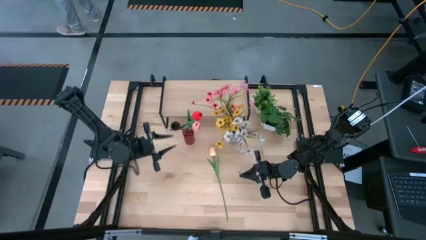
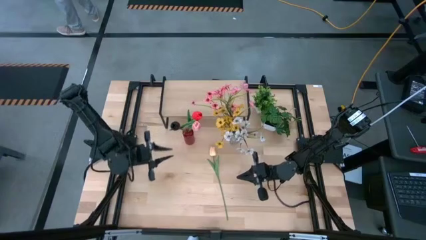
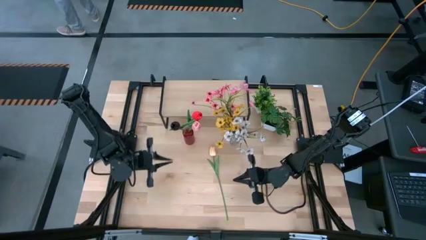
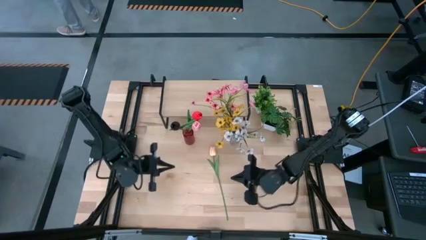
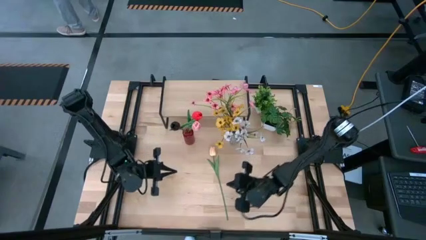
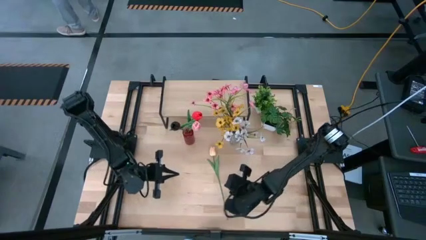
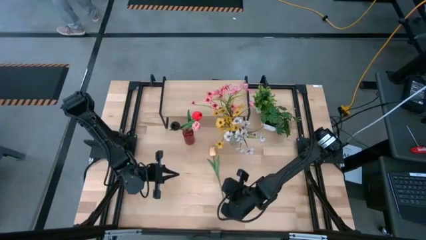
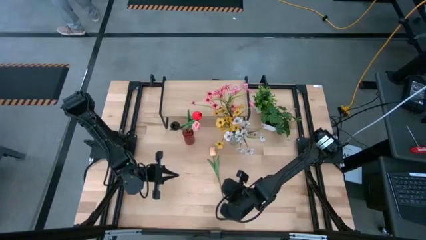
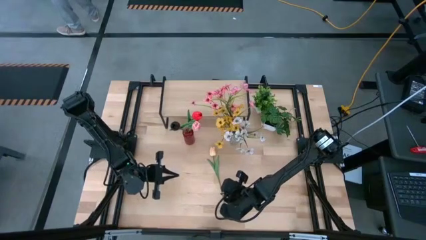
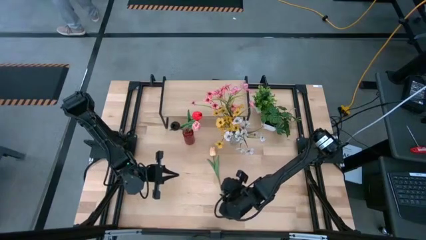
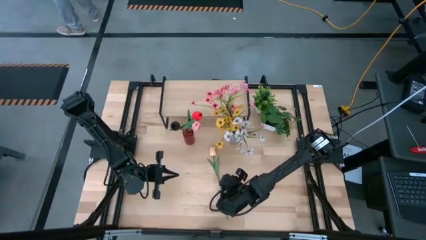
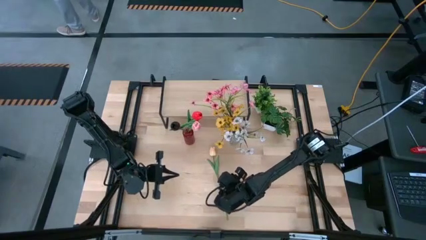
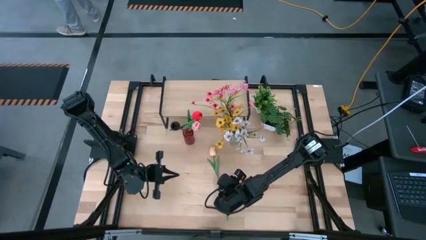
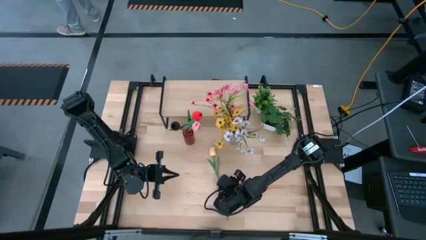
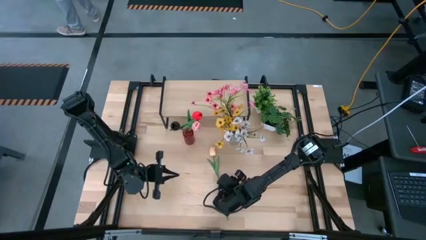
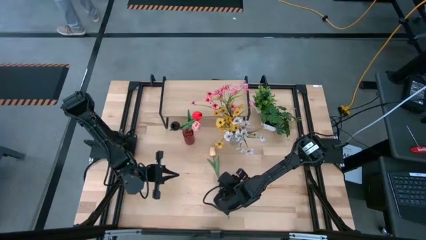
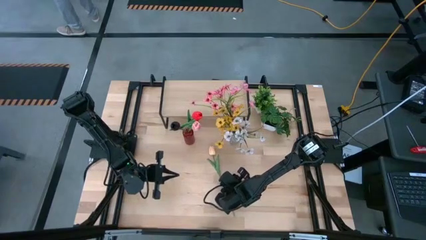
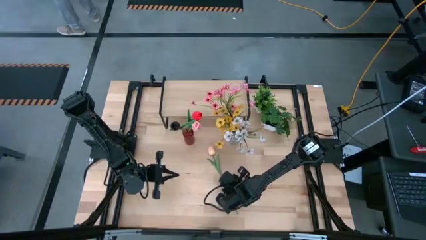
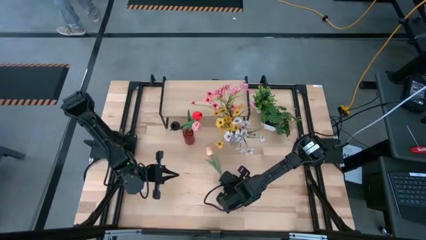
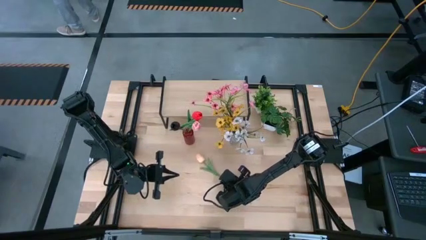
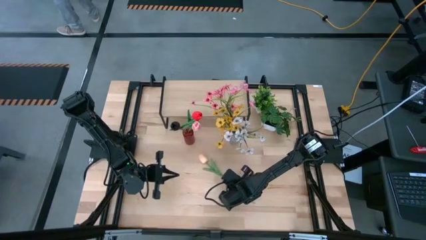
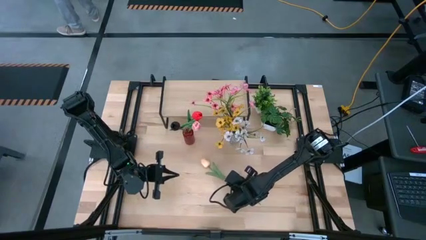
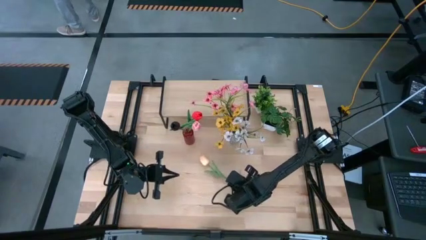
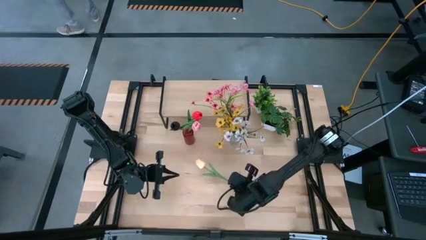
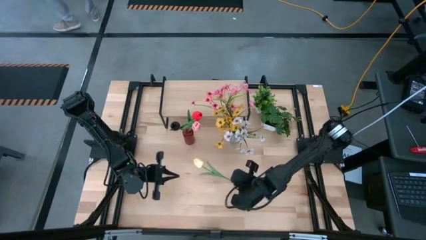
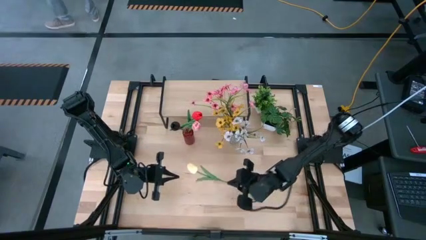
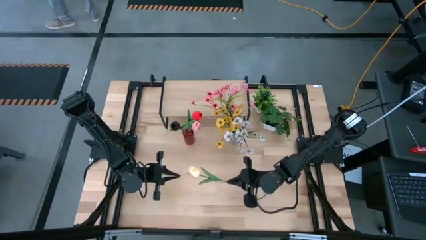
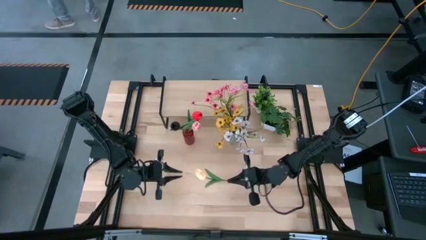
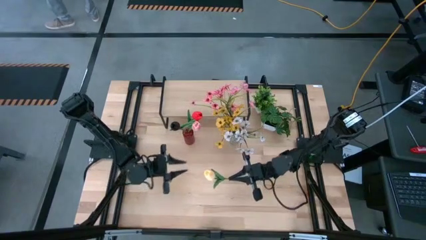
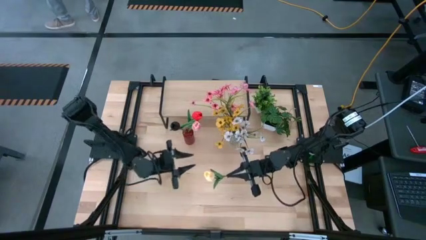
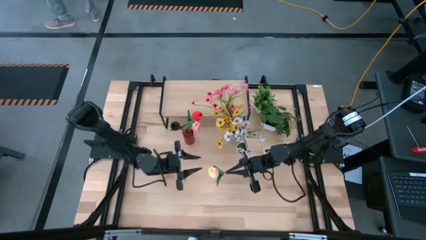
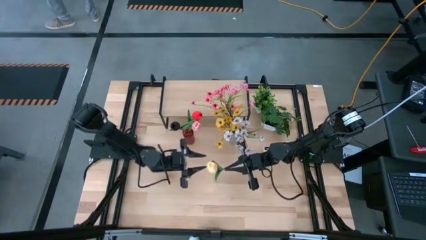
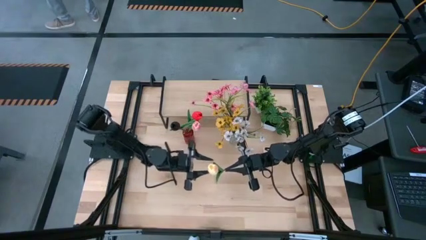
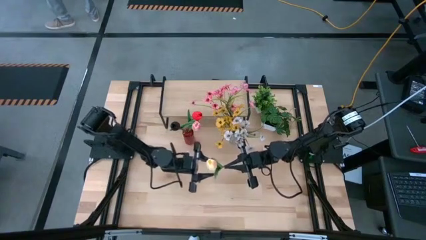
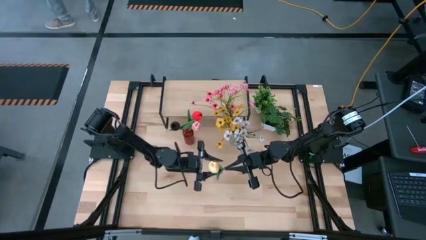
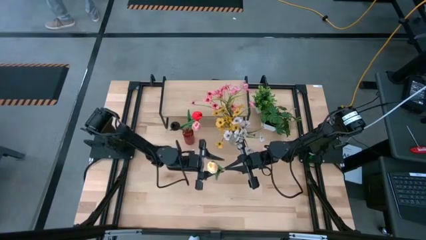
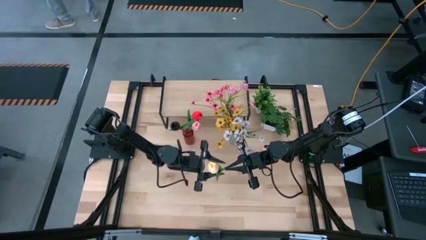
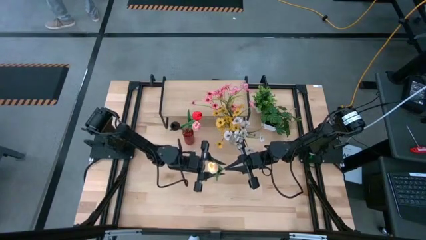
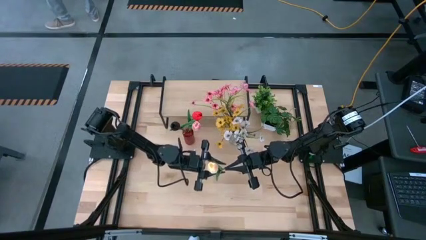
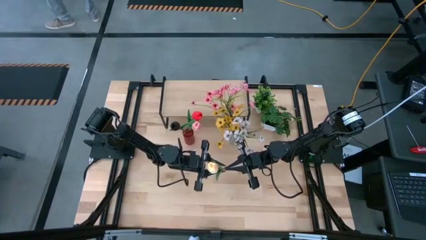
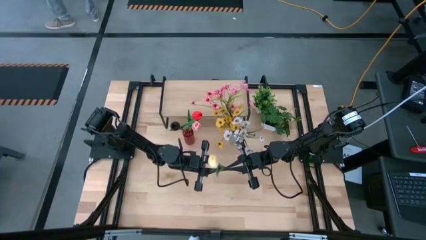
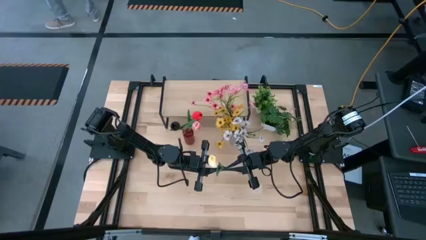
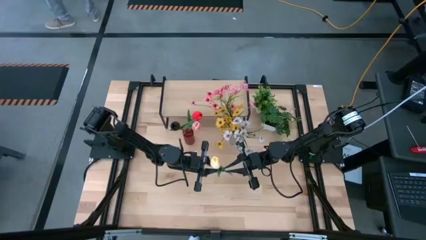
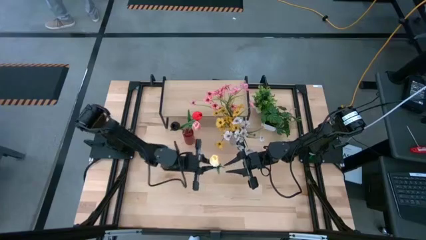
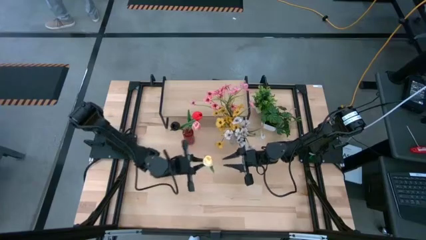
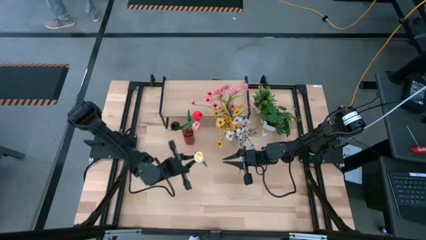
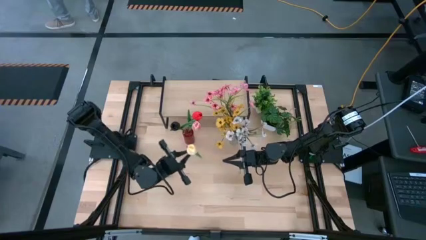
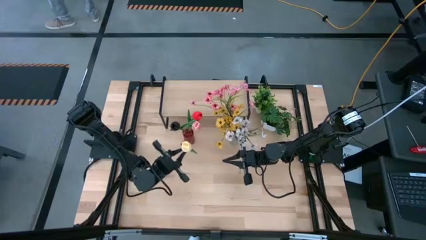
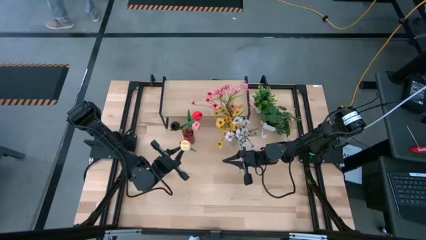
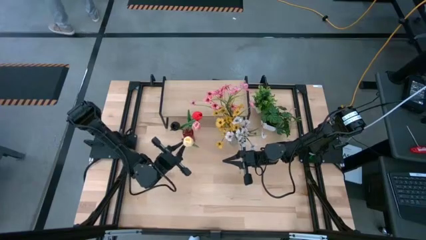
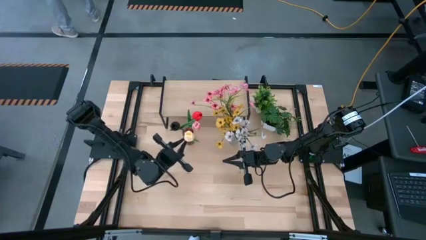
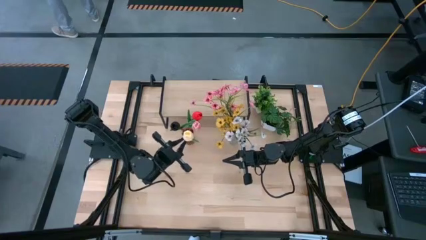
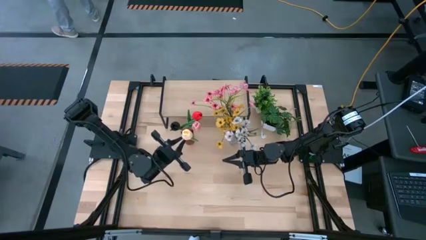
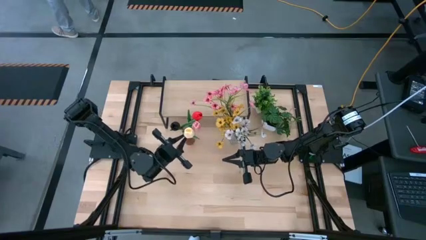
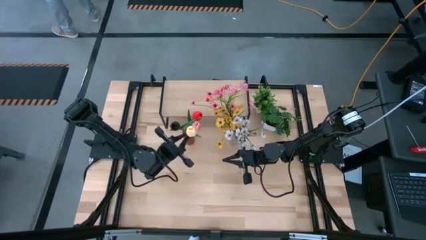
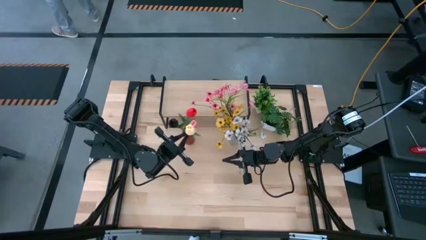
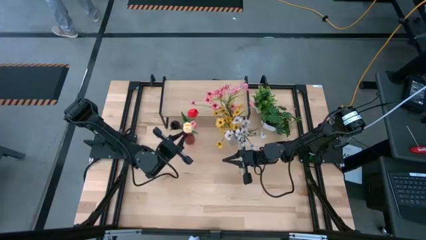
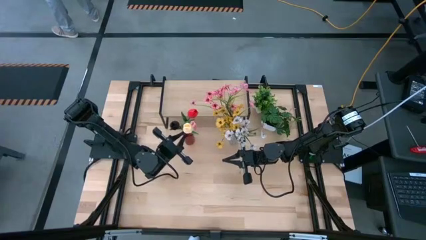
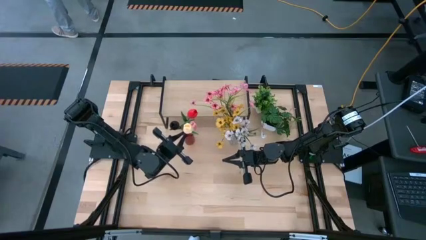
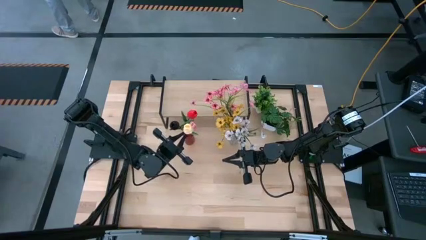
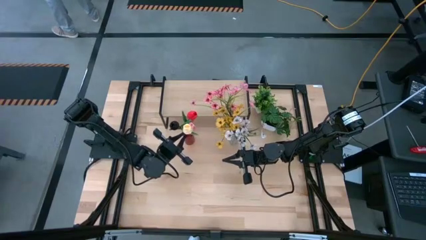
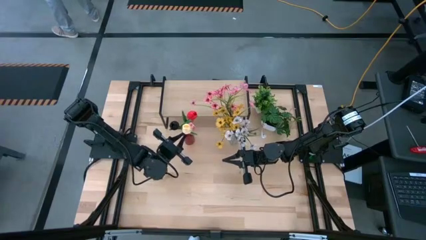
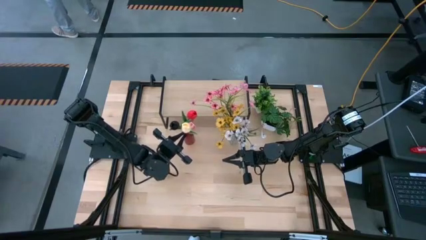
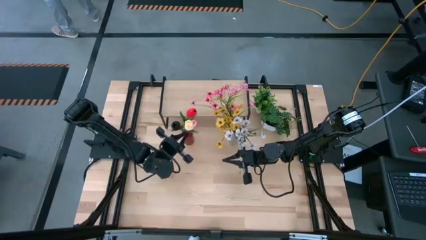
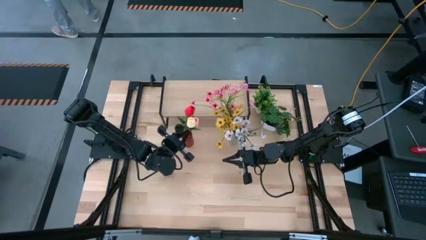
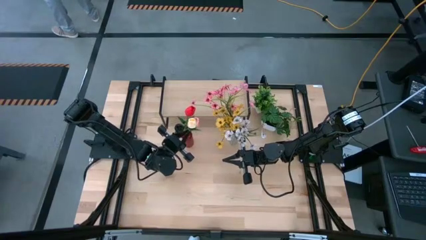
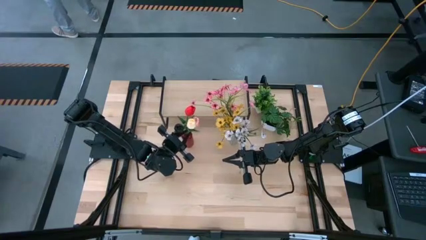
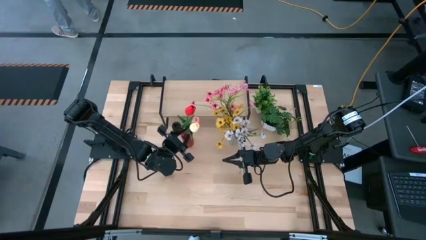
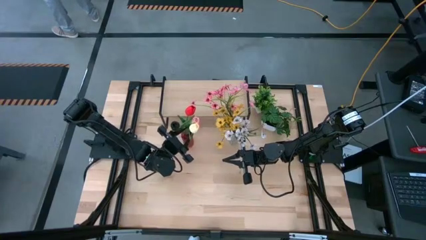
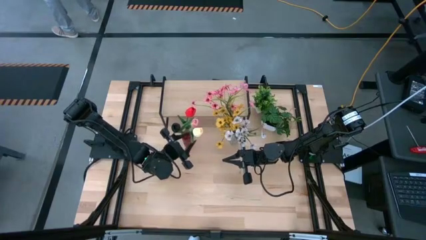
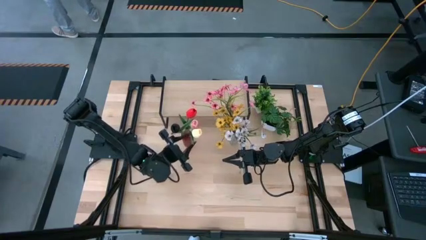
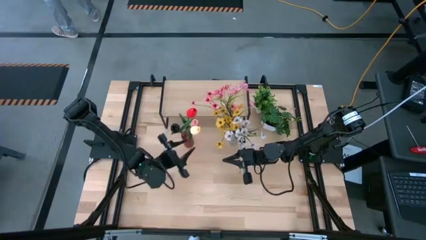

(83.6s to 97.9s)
Task: Pick and place flowers into a vace then onto a shelf
Put the yellow flower into the red flower vase

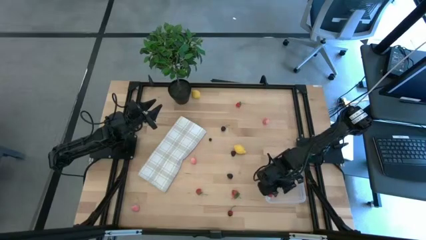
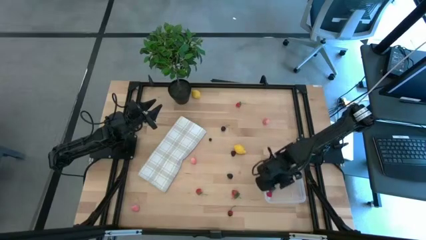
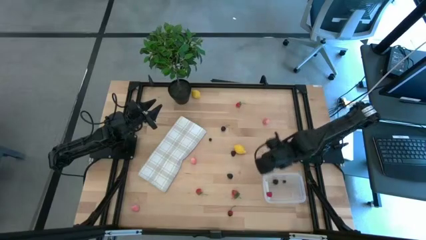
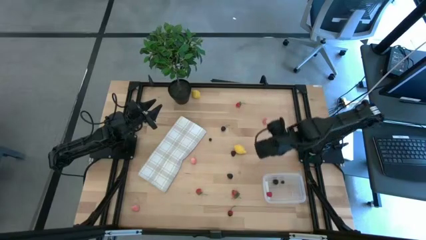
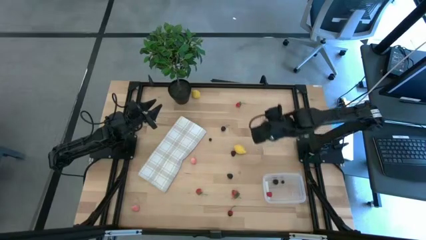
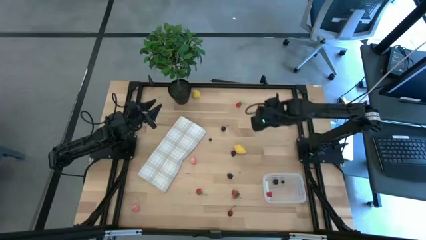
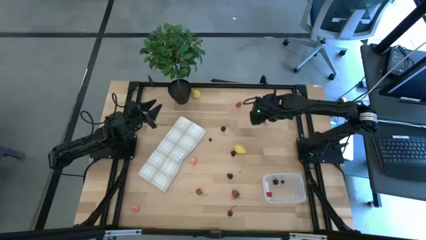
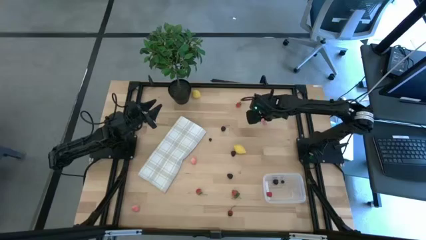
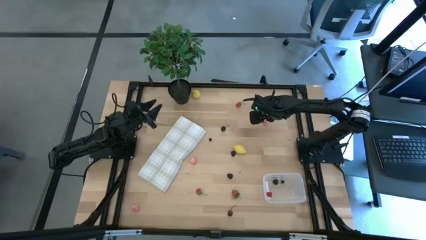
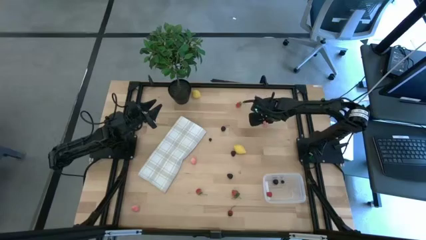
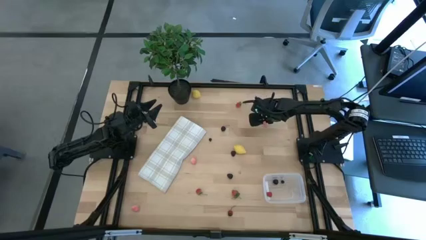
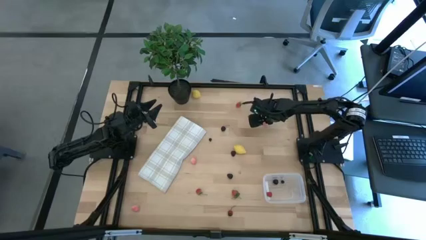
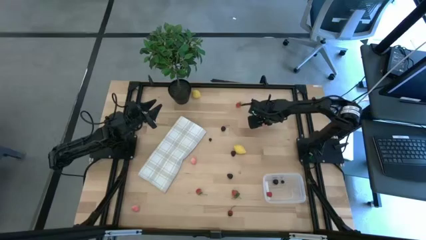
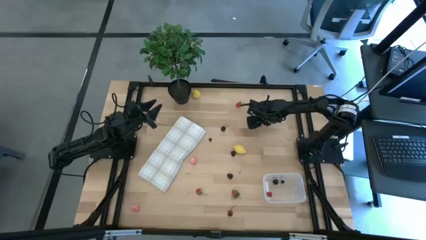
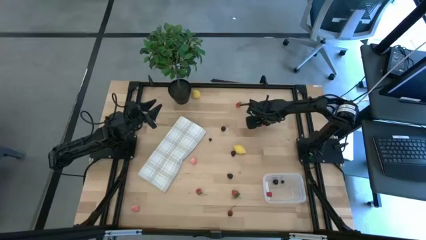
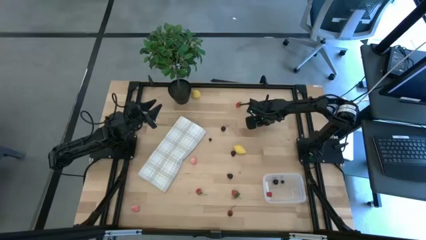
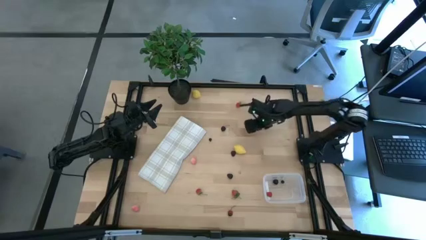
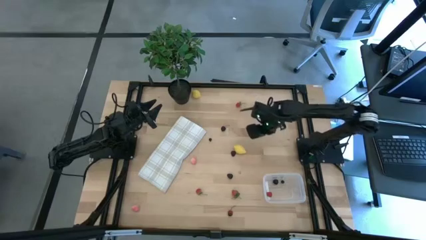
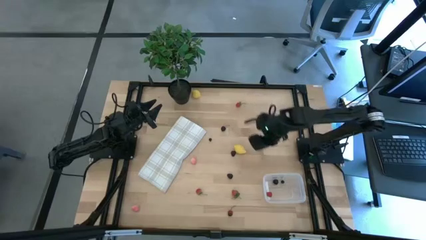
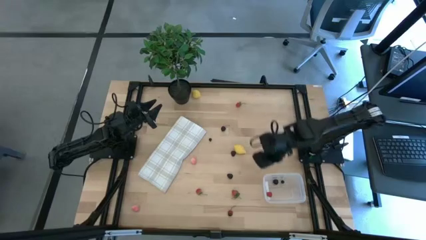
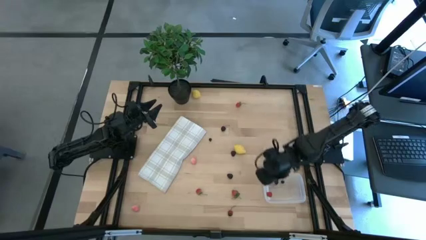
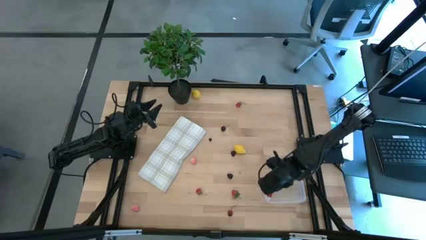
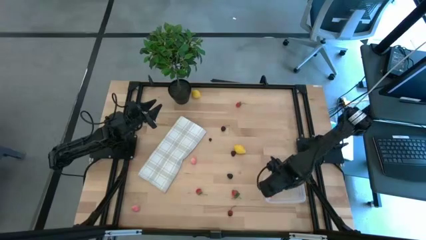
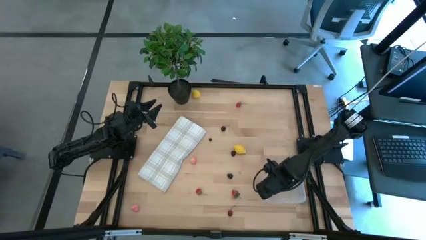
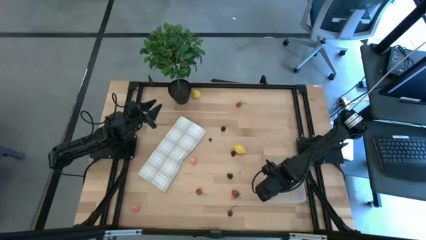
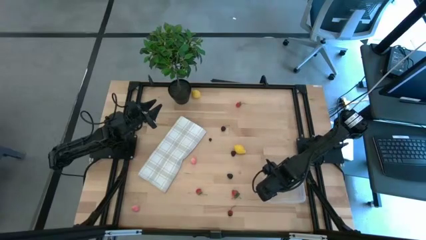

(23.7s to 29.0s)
Task: Pick and placing Produce into tupperware
Put the top right pink peach into the transparent bin
